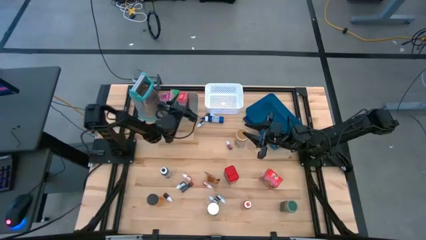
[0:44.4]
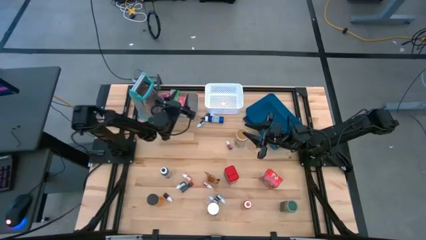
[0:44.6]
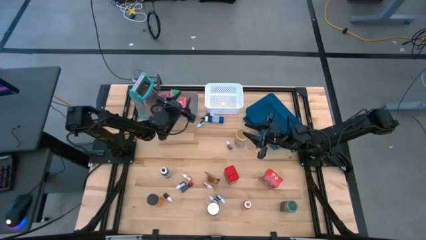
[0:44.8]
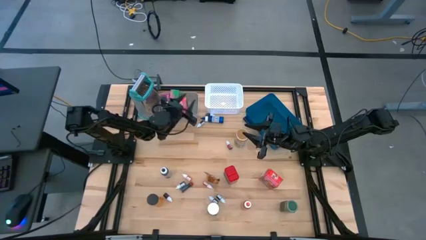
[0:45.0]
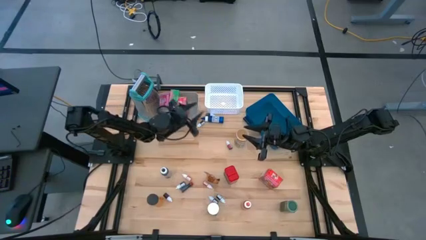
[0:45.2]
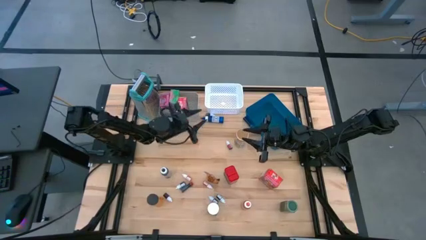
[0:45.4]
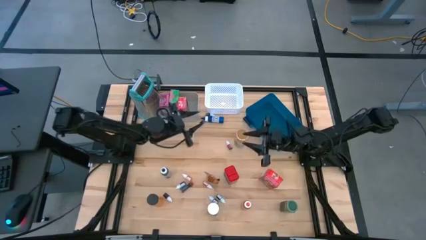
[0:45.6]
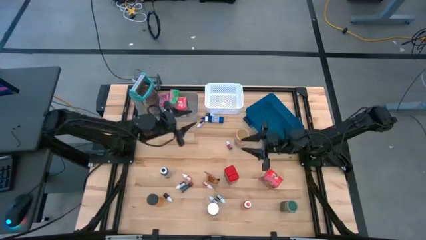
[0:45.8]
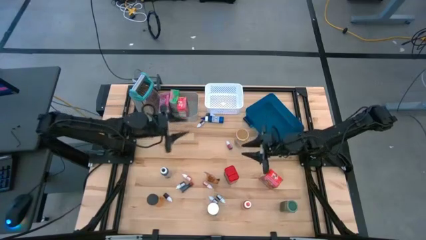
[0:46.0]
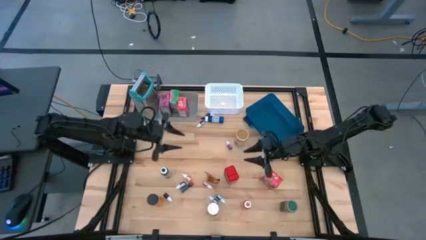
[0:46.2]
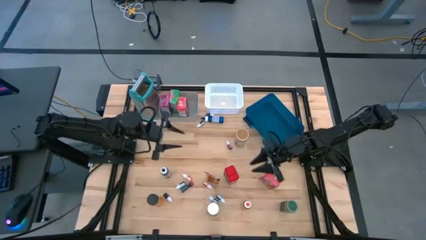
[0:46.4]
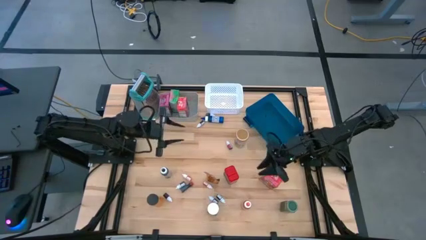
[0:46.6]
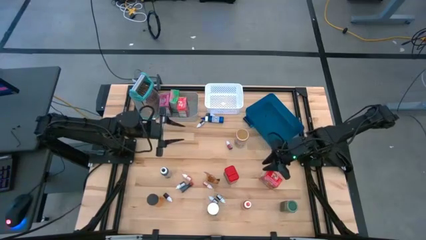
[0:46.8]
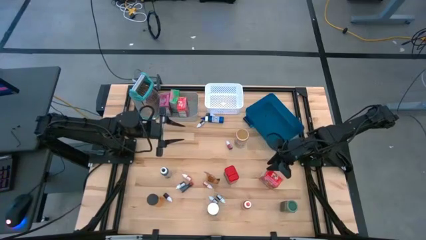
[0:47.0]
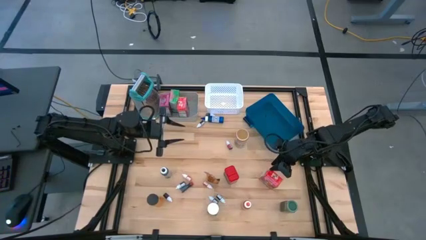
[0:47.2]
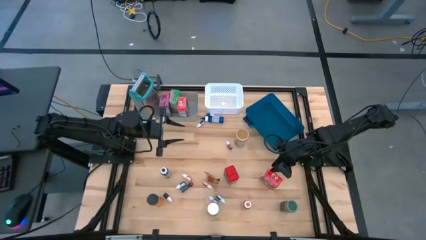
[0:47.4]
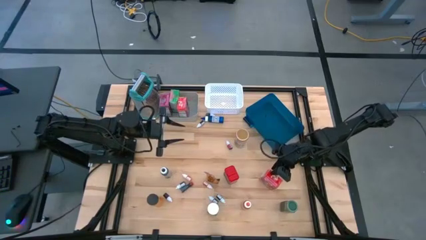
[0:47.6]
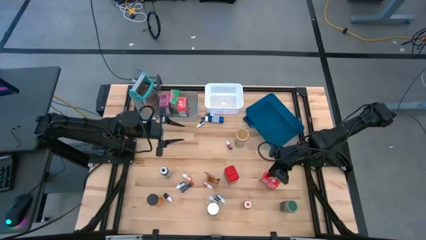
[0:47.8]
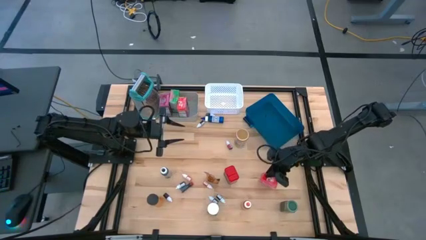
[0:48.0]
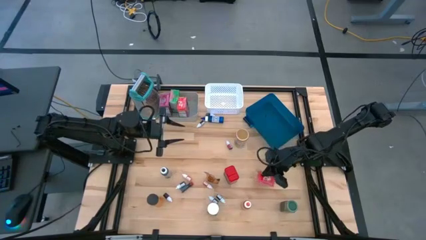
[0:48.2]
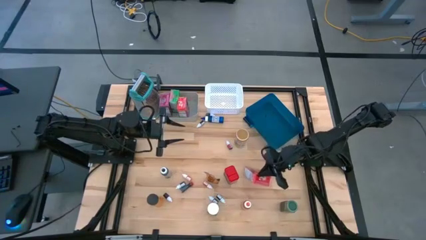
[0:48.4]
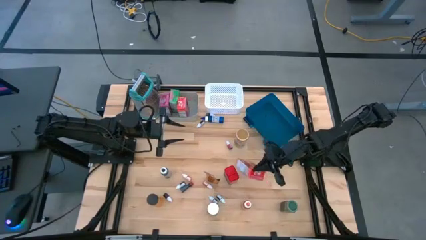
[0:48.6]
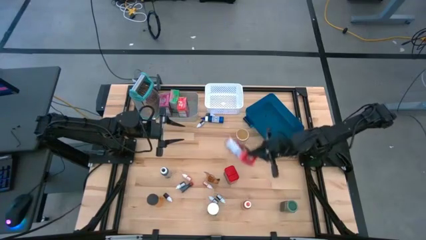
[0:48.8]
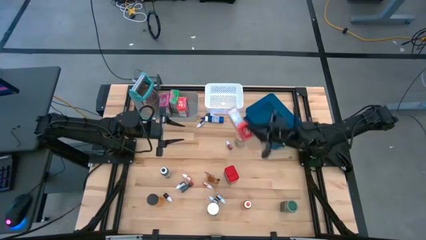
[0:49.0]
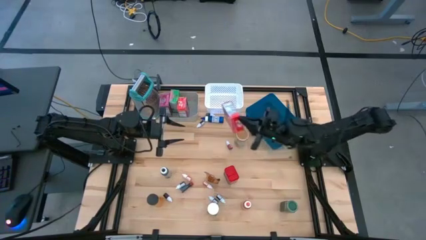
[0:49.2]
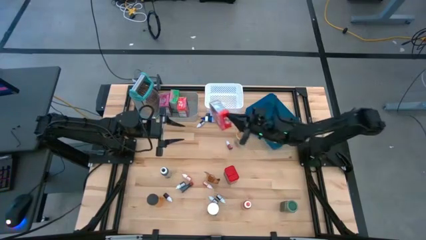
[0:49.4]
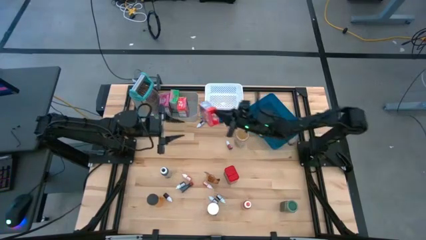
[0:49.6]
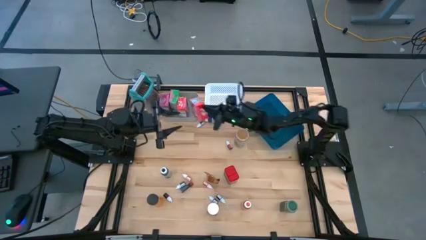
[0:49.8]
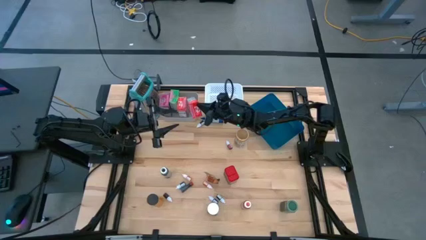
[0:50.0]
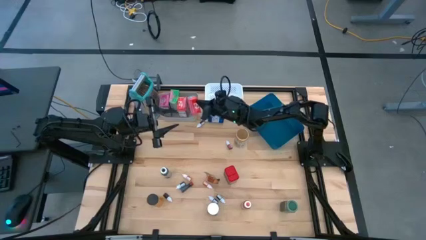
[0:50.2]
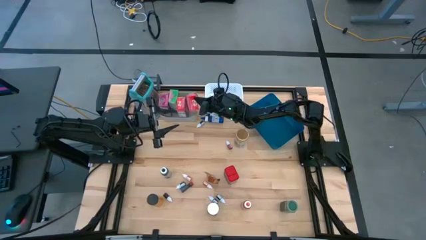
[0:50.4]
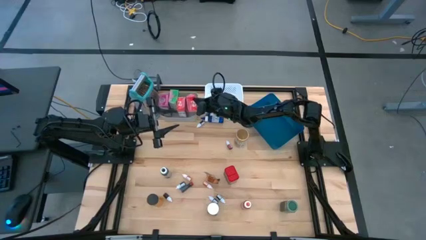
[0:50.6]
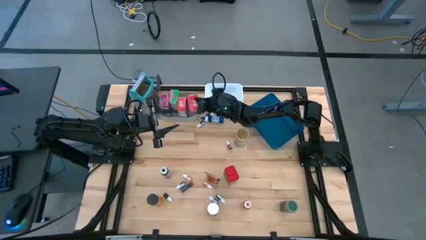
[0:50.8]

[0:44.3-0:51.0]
Task: Pick & Place Kitchen Items
Put the bottom red cereal box into the gray bin

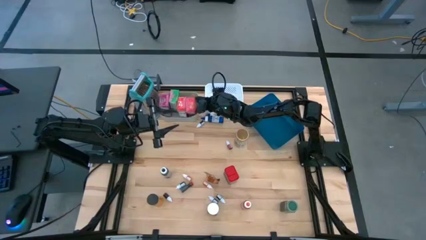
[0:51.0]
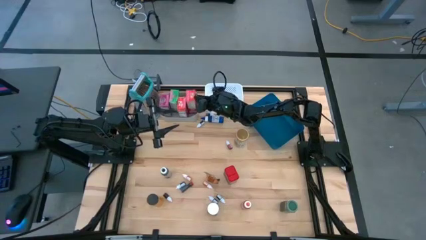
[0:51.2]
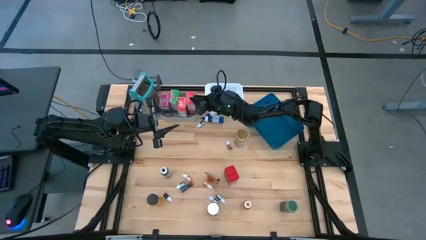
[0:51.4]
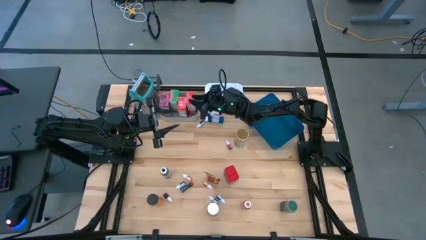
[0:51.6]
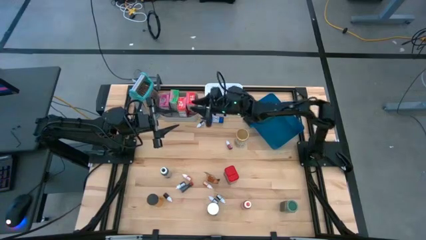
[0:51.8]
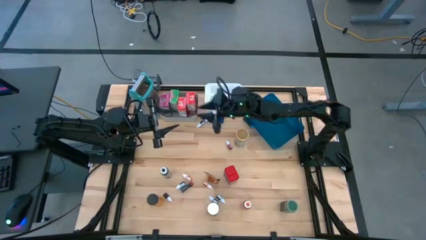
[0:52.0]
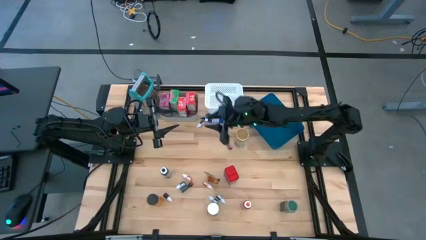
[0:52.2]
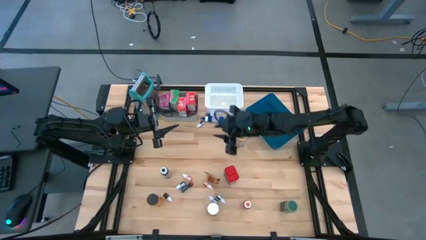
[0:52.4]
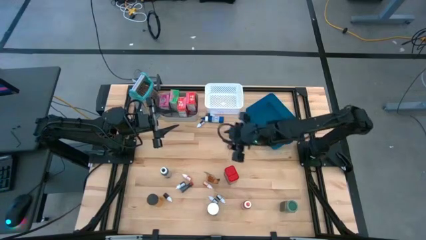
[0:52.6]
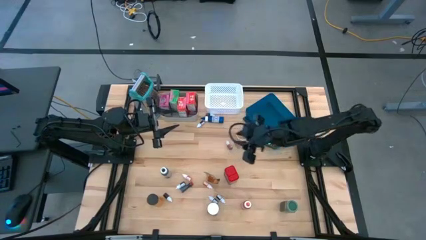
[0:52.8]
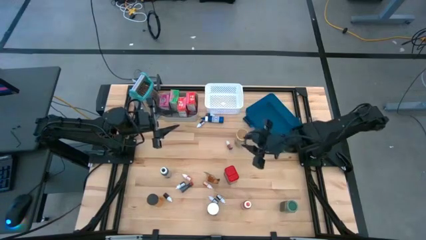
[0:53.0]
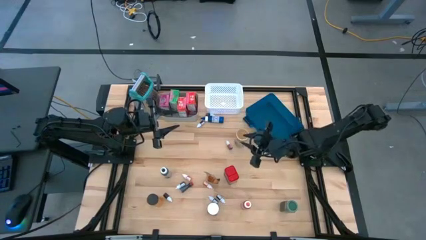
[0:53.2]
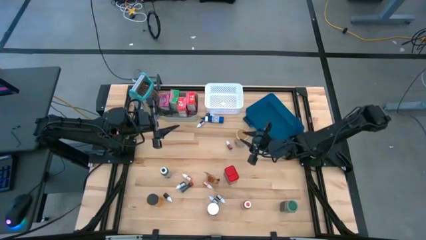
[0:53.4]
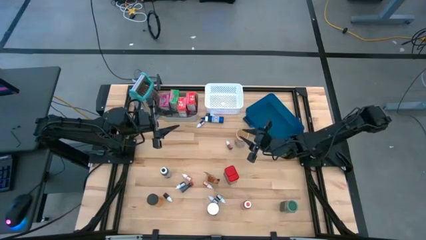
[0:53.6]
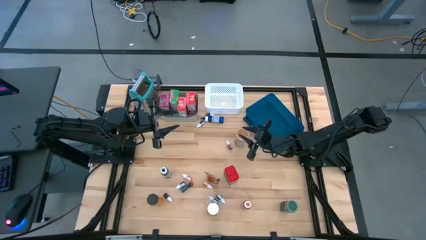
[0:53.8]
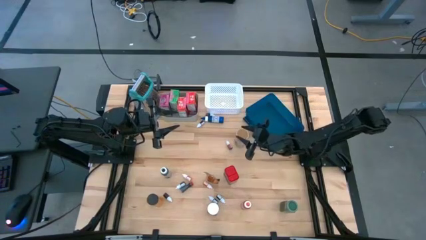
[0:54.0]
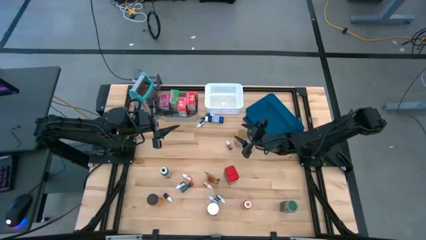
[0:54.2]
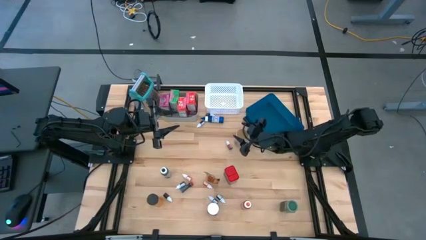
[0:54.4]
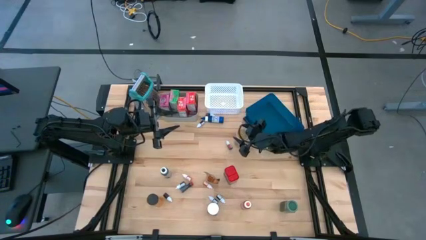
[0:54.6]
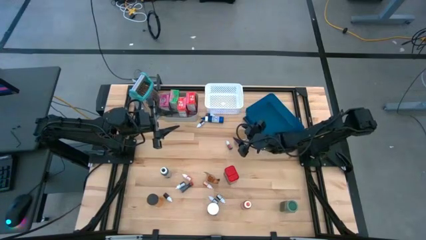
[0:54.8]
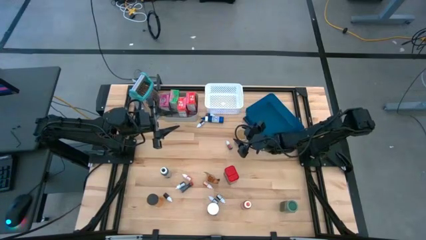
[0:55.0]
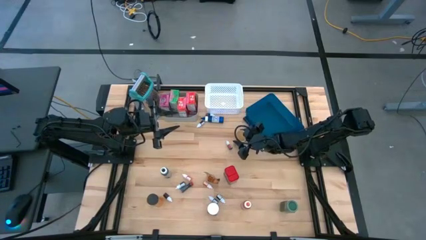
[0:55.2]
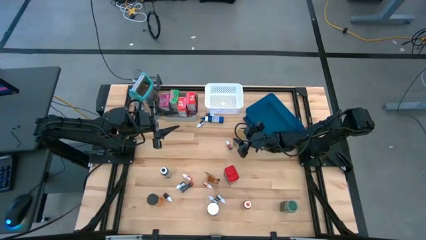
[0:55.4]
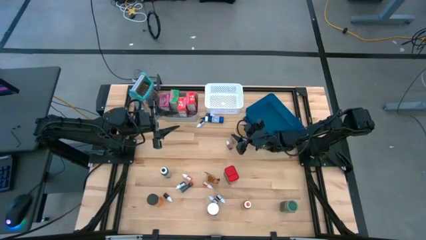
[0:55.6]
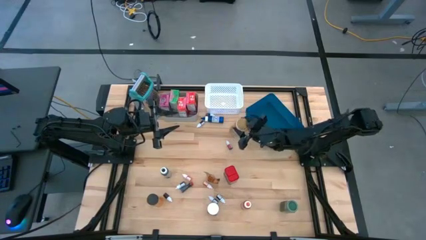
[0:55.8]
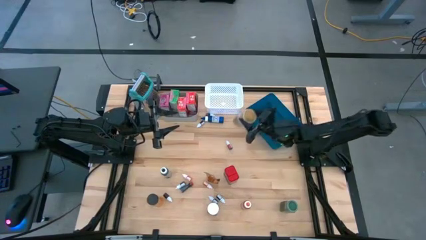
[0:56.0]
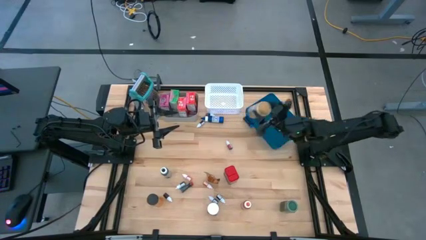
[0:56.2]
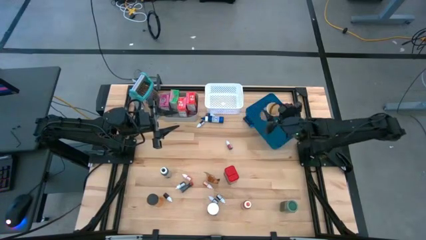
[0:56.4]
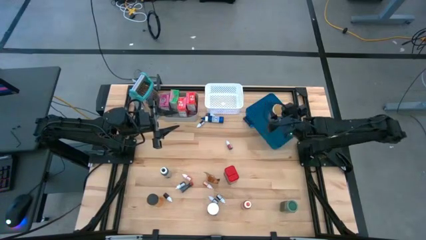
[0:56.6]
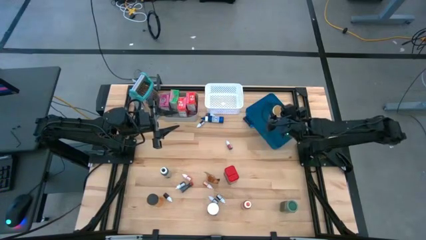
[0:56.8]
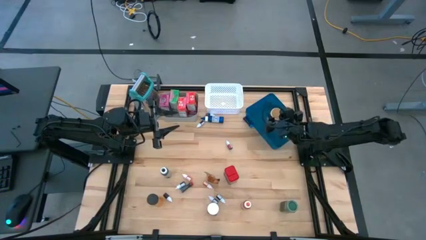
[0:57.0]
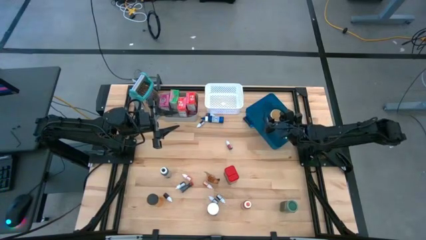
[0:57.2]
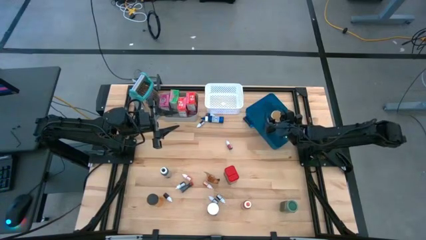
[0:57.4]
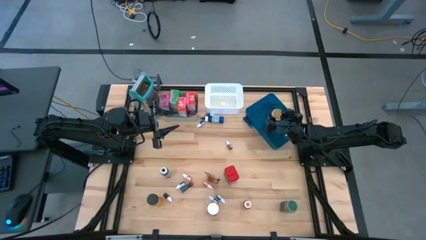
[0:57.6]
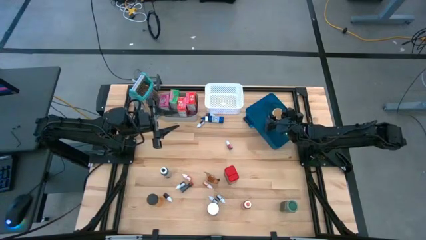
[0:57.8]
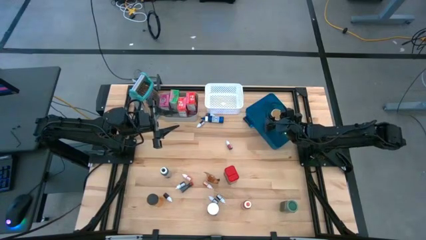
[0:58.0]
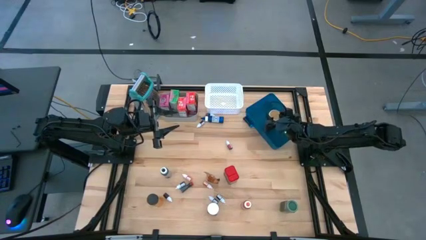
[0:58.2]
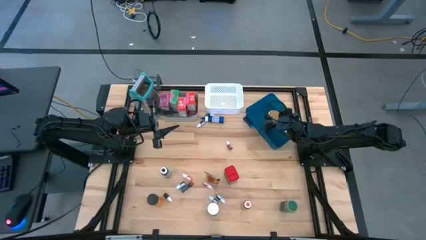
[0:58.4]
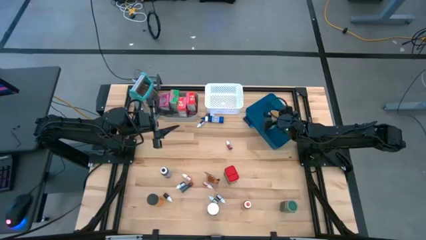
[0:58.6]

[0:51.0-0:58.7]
Put the gold seasoning bottle into the blue bin
